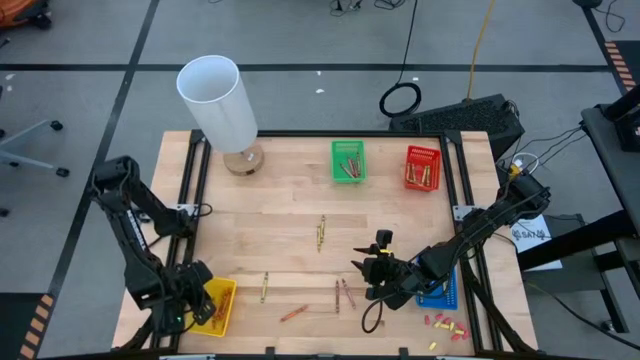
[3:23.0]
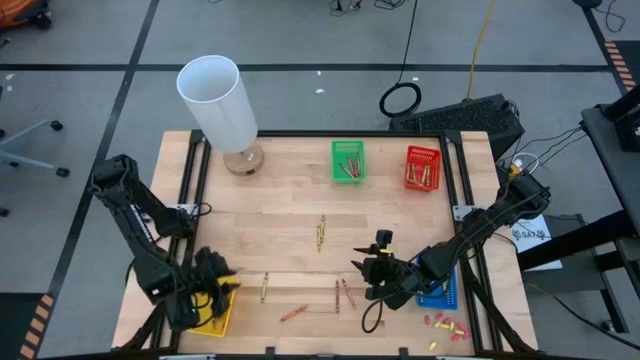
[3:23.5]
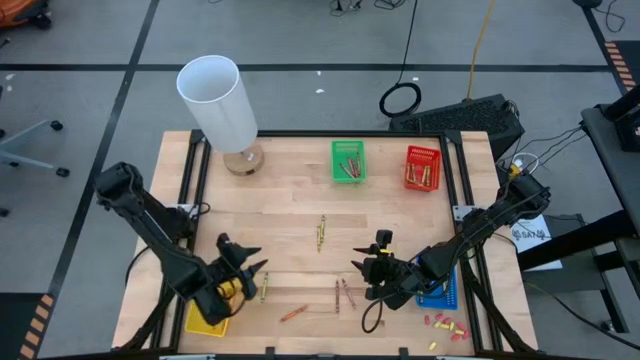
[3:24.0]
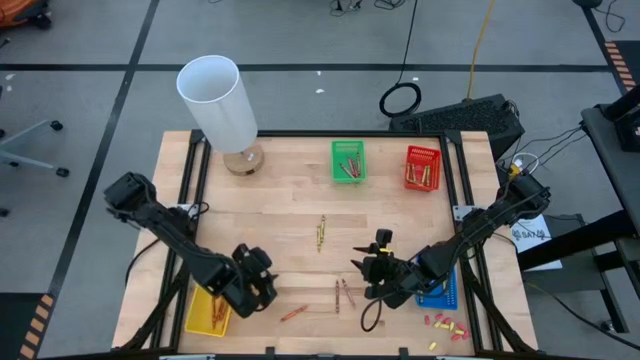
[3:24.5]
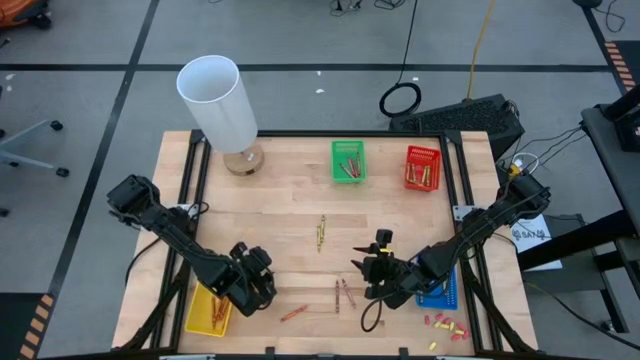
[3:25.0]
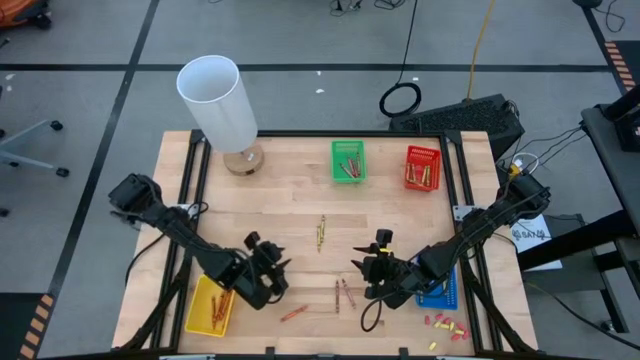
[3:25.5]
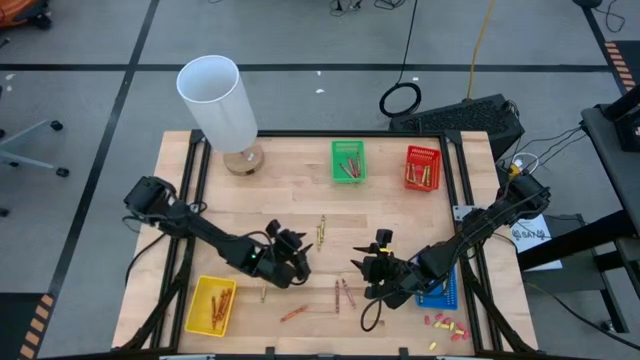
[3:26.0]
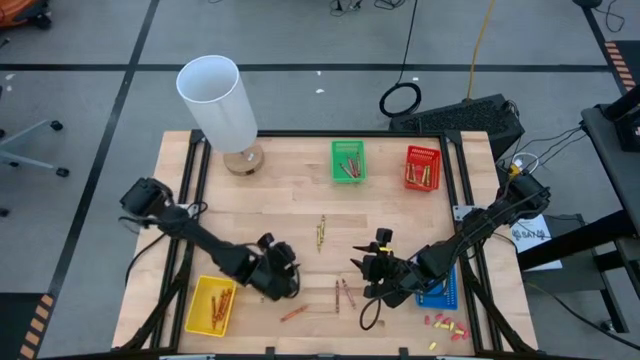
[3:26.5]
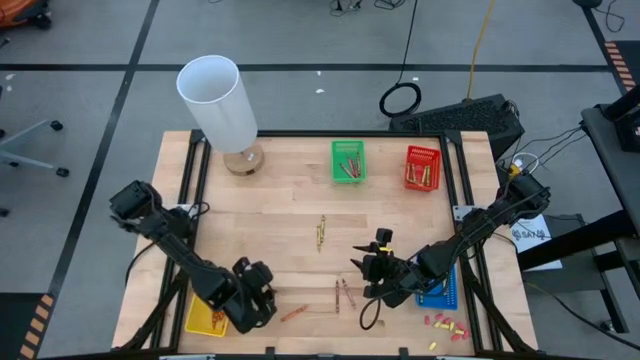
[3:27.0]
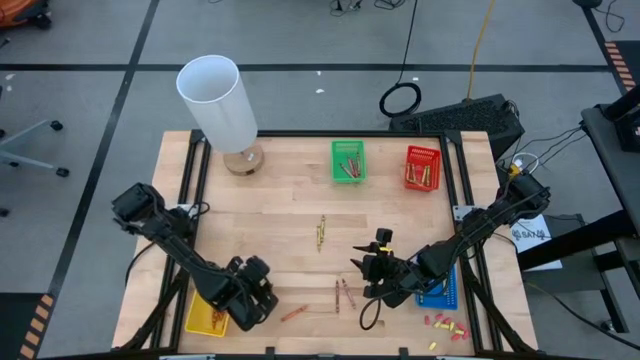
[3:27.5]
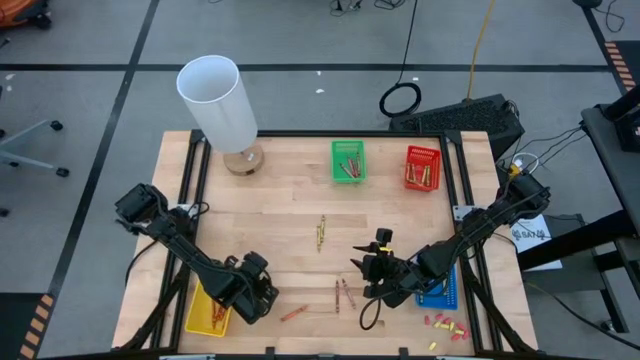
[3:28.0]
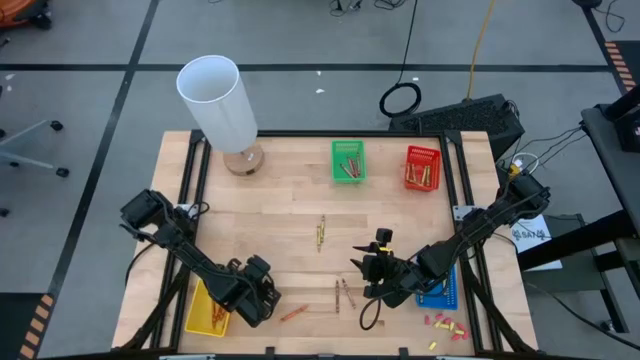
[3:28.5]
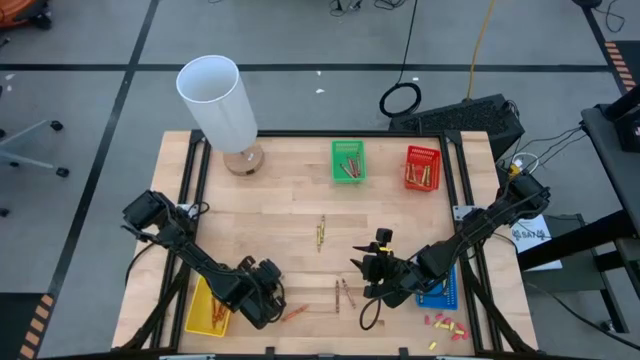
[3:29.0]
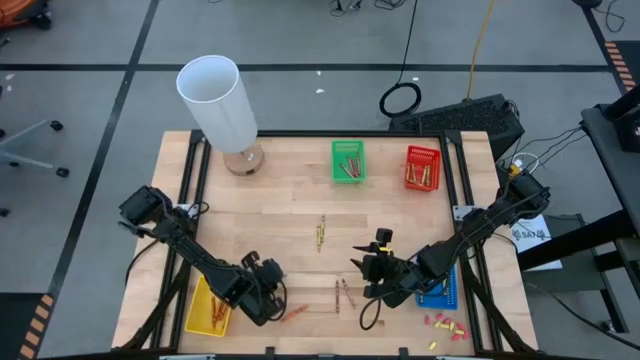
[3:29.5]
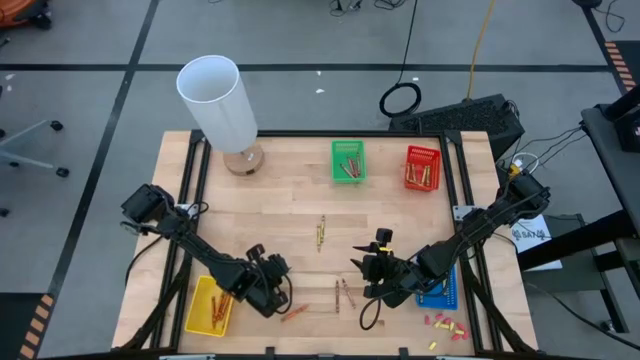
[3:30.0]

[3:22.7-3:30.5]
Task: Sort crayons
Put the green crayon into the red bin

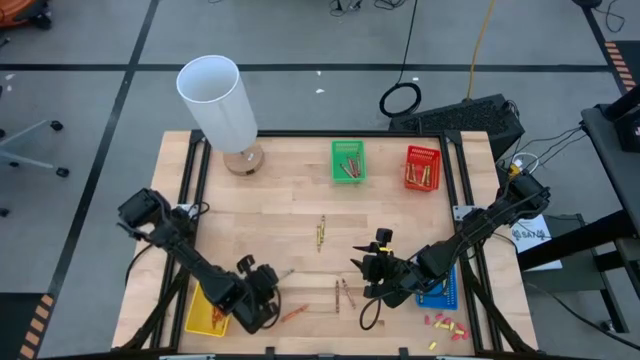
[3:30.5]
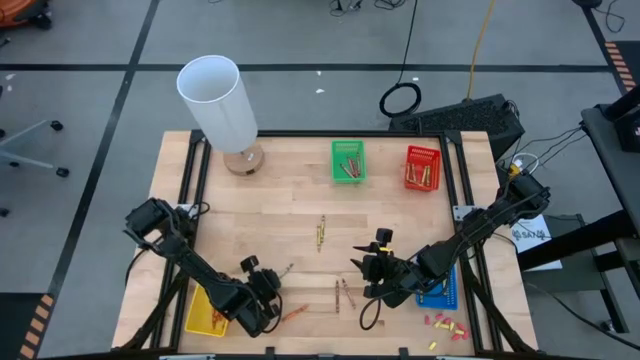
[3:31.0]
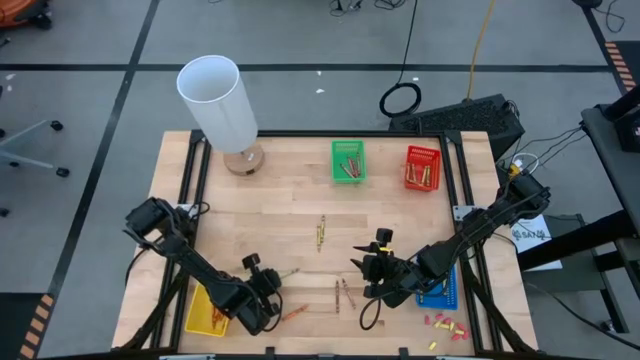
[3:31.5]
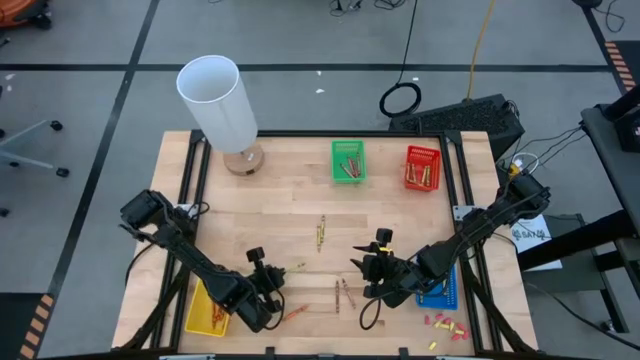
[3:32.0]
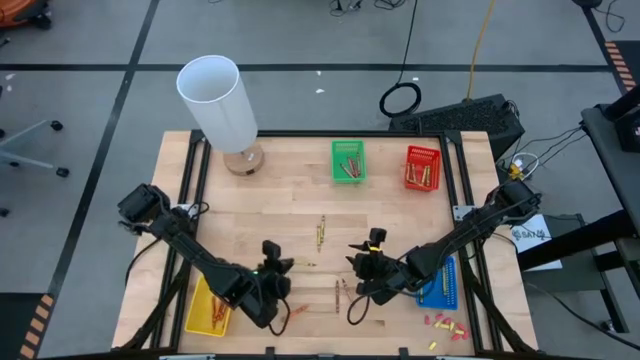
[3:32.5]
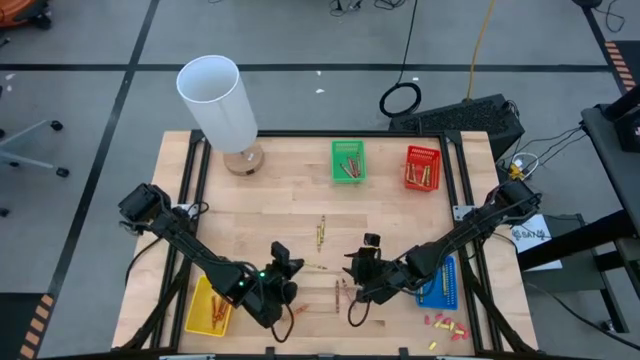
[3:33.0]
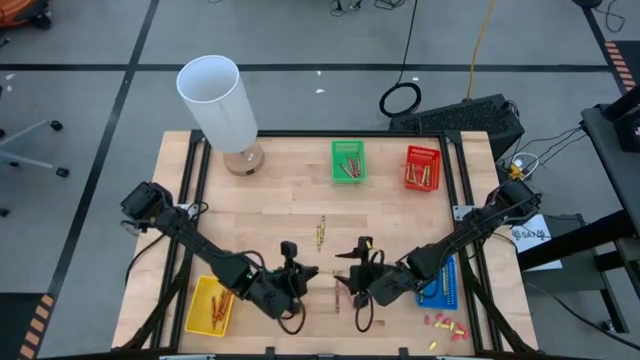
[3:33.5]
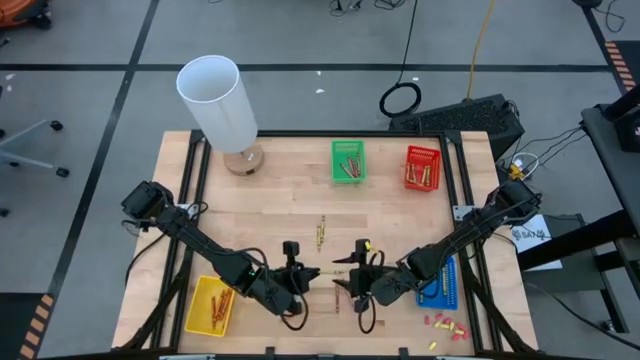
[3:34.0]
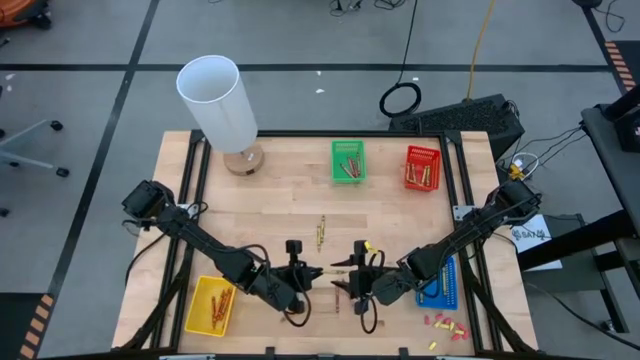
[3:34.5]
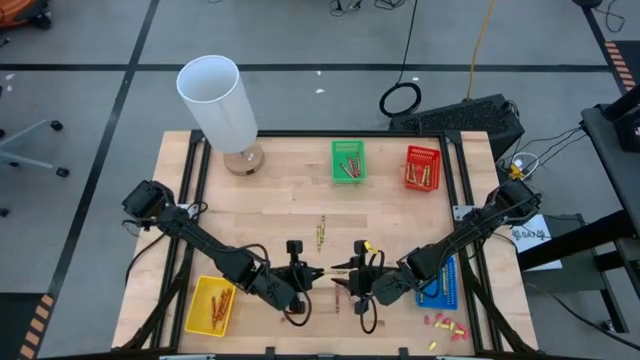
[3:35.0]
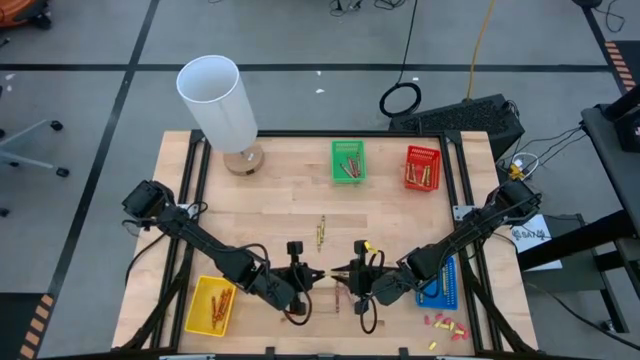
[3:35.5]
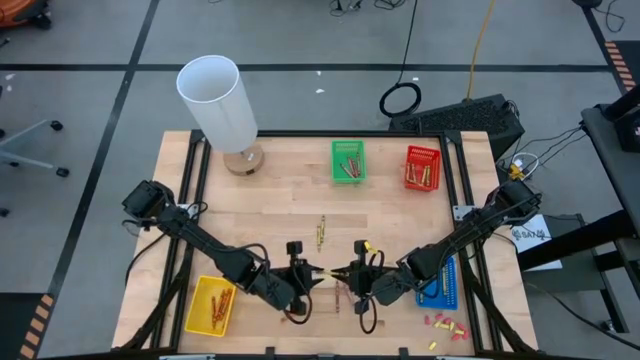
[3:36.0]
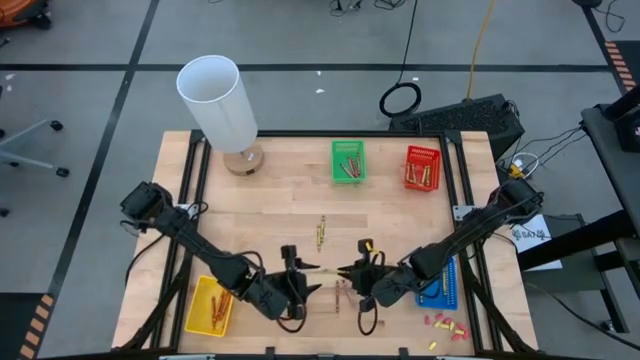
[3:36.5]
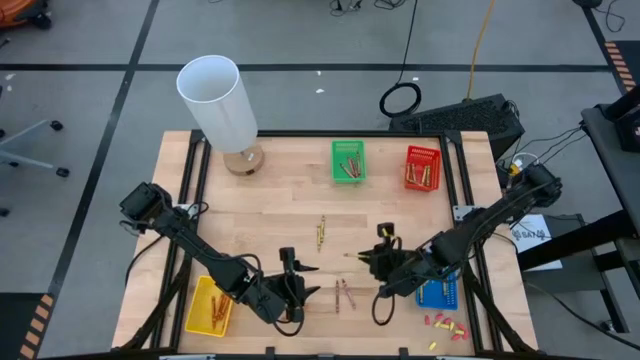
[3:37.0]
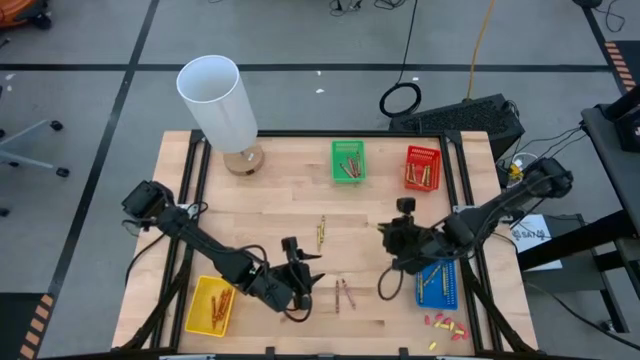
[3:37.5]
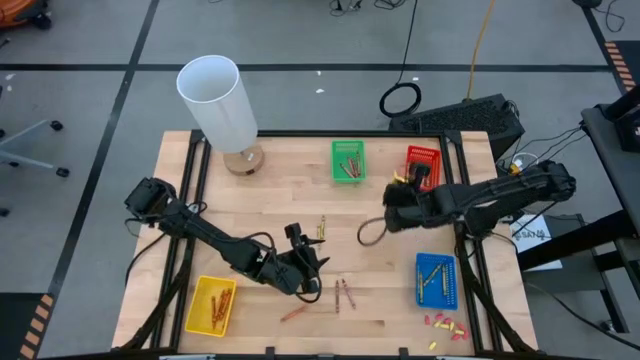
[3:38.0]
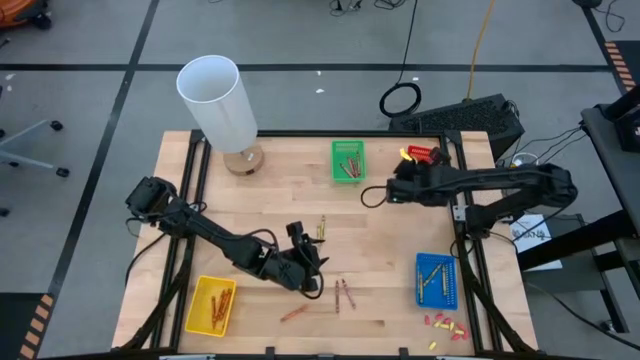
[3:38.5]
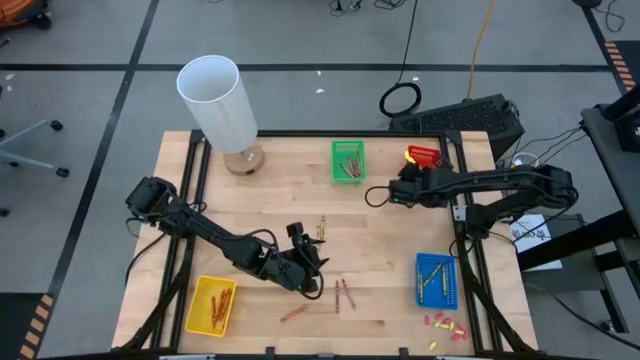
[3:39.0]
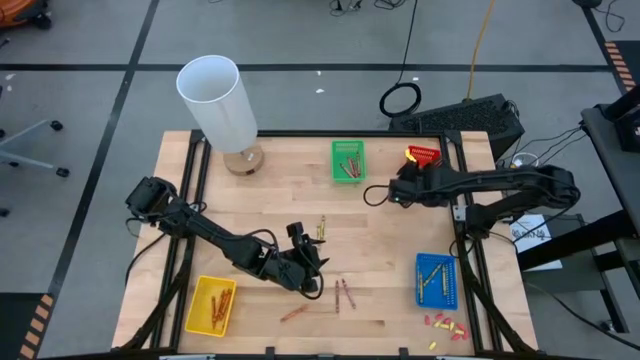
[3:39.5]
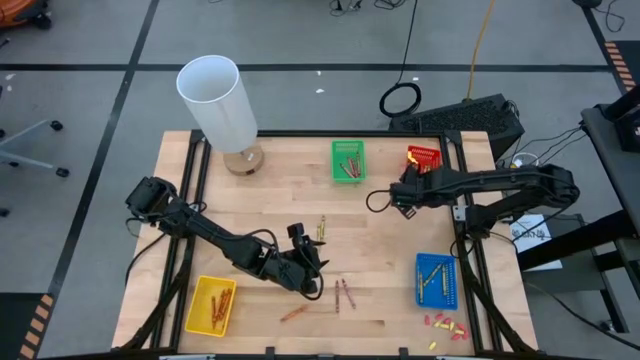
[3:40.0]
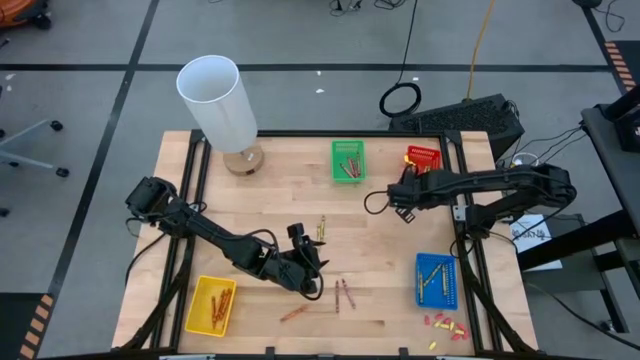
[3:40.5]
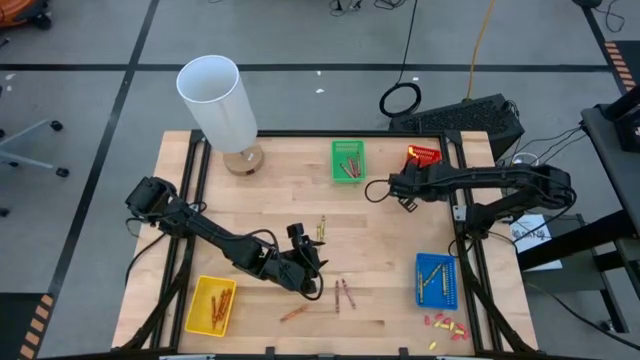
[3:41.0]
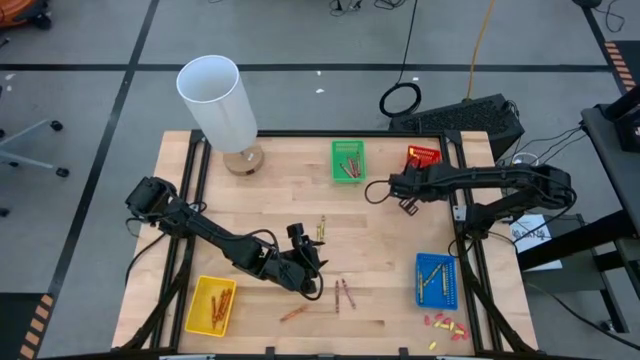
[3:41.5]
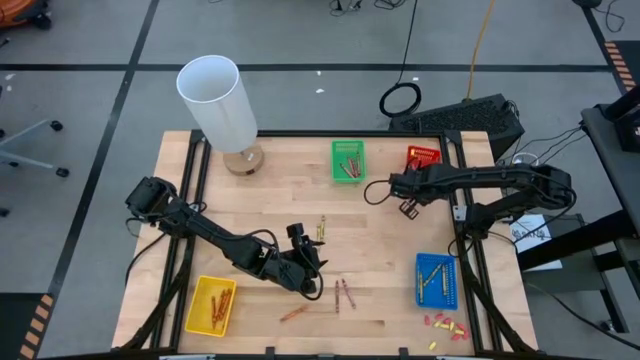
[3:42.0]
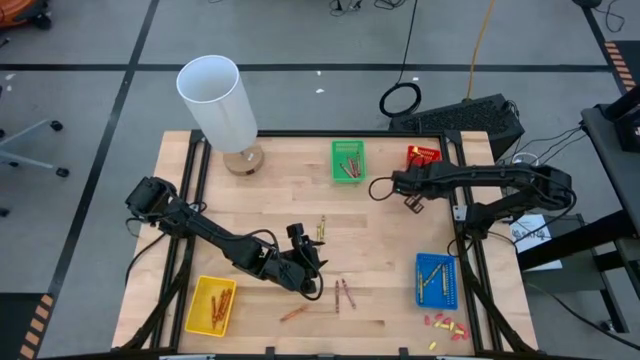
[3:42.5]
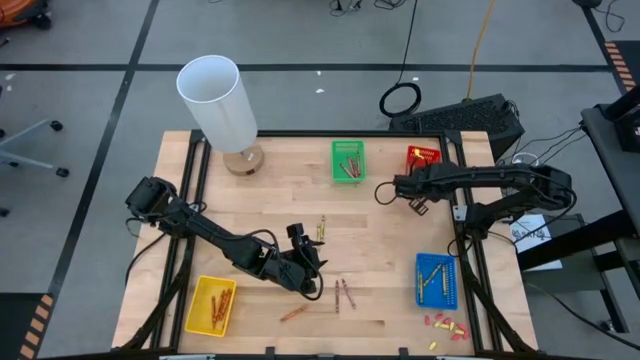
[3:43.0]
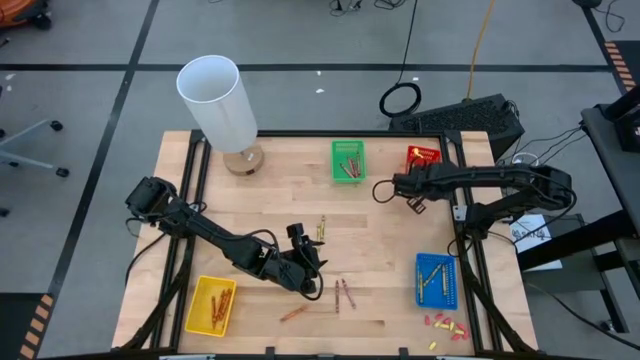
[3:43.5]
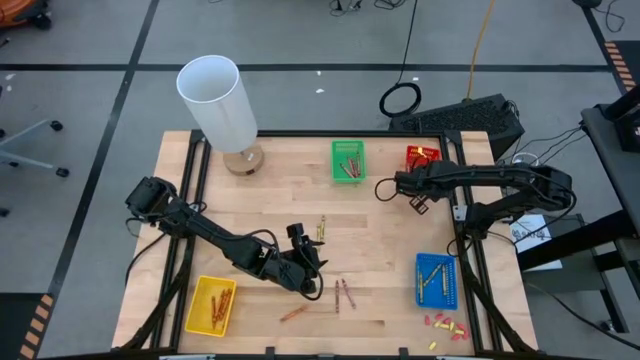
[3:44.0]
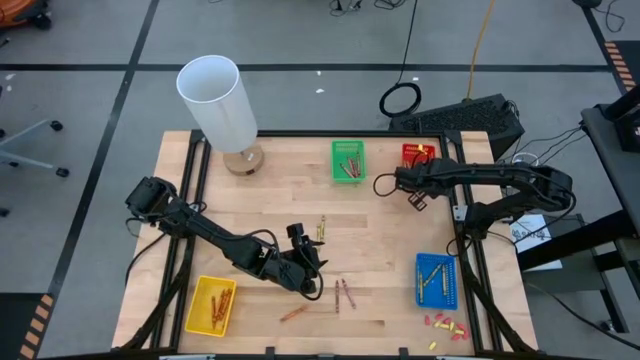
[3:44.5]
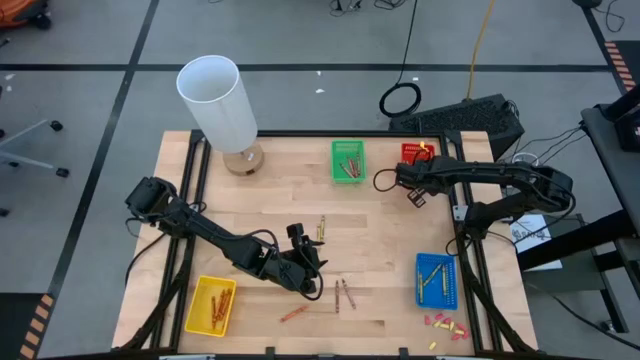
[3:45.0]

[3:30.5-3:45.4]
Put the green crayon into the red bin
